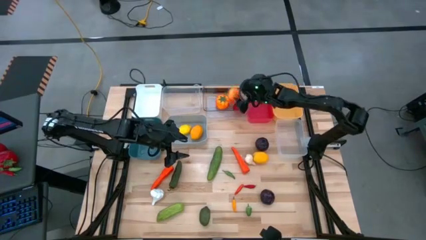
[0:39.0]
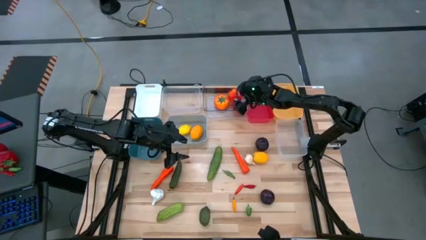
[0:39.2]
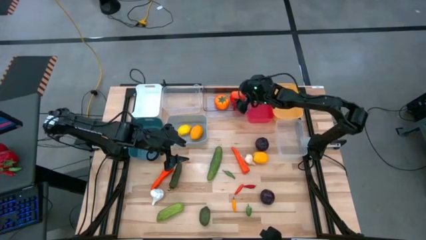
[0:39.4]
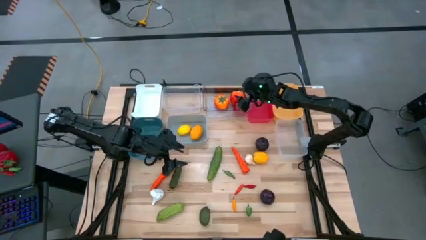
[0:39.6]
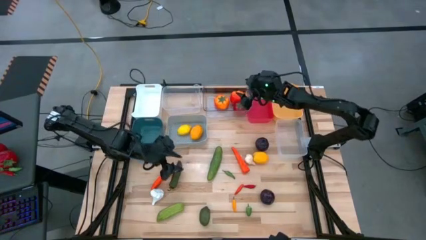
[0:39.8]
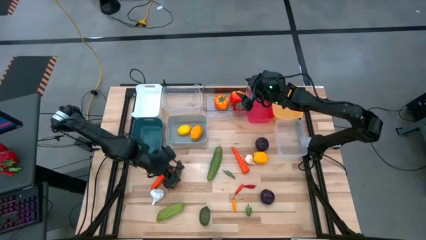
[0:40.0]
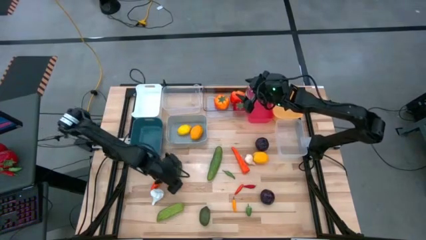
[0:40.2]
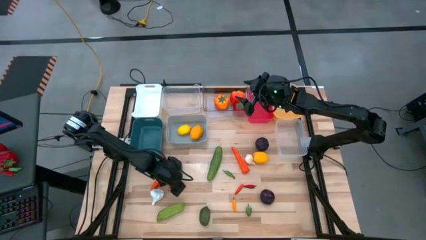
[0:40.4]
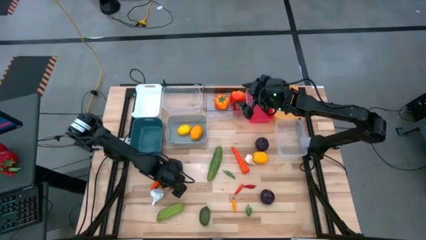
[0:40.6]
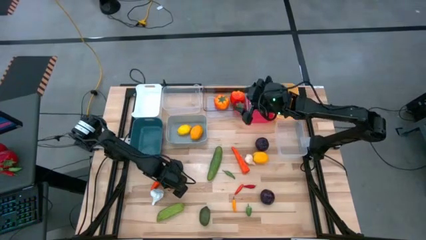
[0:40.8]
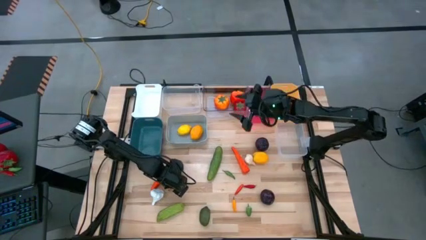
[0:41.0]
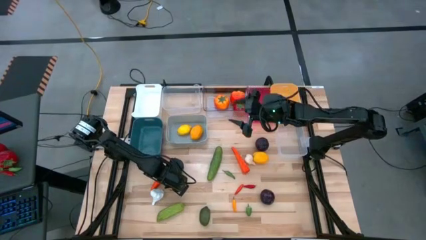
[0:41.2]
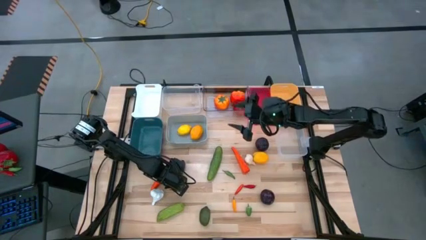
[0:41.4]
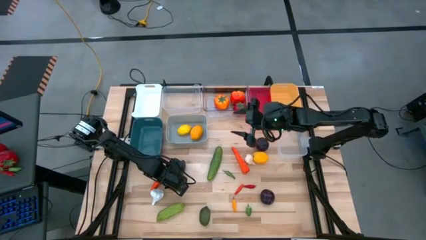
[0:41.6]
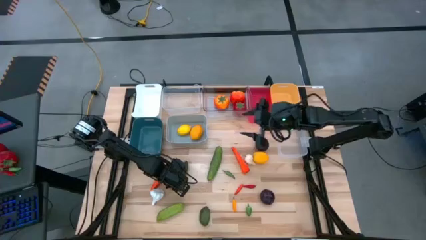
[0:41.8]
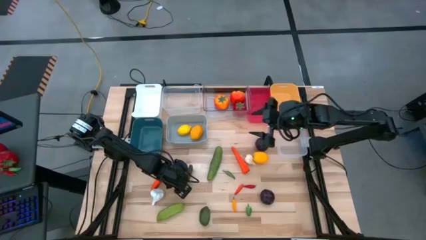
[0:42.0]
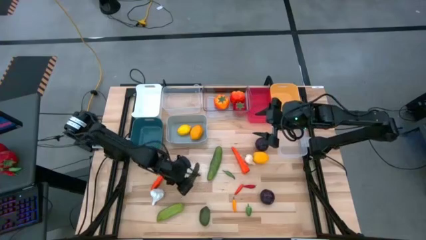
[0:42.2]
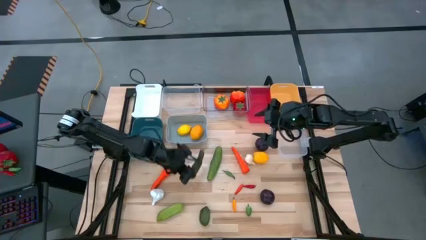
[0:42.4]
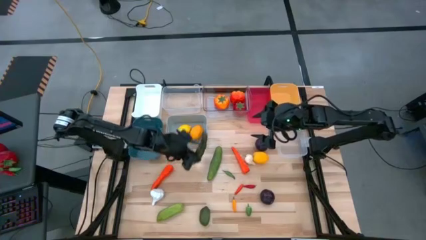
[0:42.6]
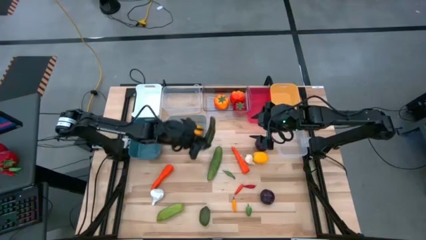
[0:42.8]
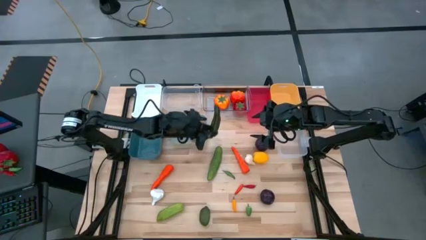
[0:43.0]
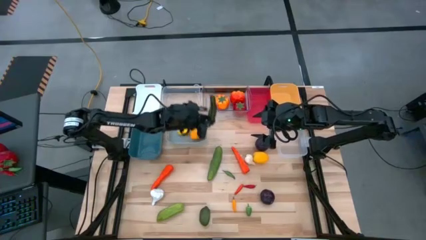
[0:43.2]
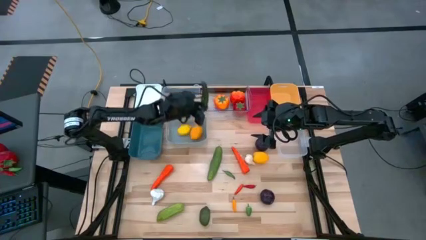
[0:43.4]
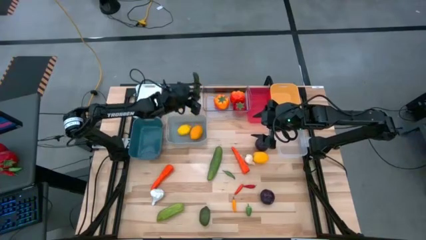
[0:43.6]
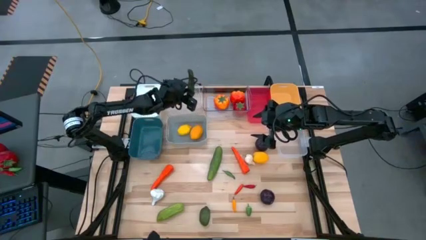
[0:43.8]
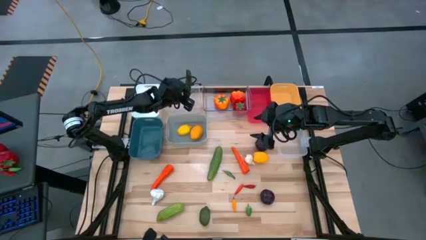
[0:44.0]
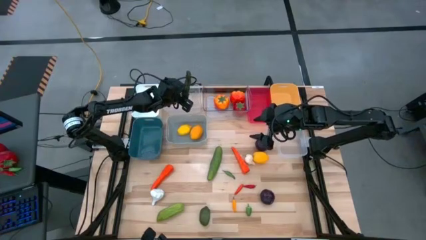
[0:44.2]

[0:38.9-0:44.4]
Task: Sort produce into baskets
Put the green chili pepper into the top left transparent bin

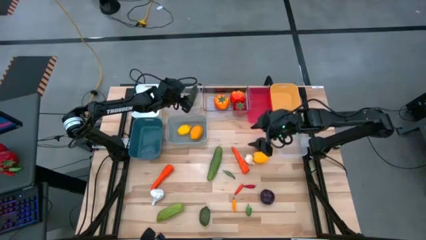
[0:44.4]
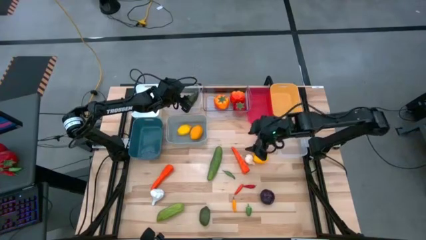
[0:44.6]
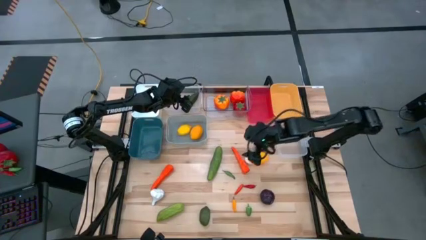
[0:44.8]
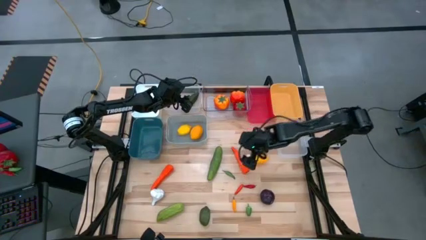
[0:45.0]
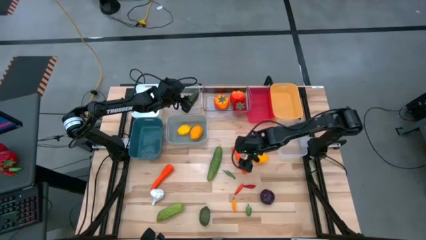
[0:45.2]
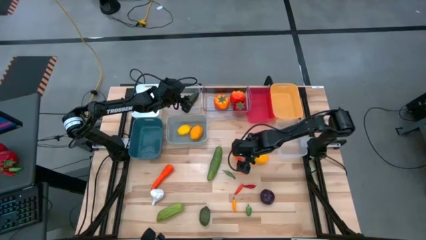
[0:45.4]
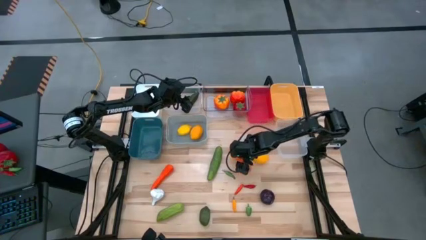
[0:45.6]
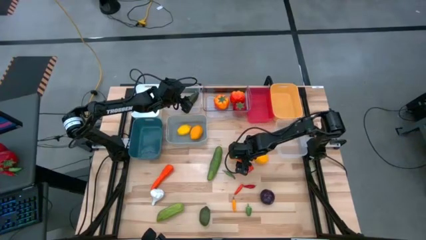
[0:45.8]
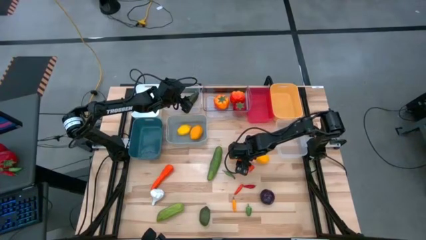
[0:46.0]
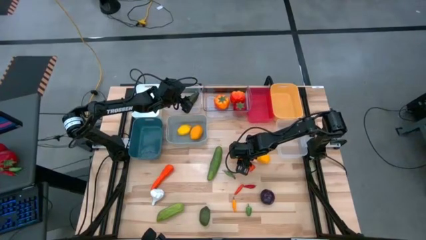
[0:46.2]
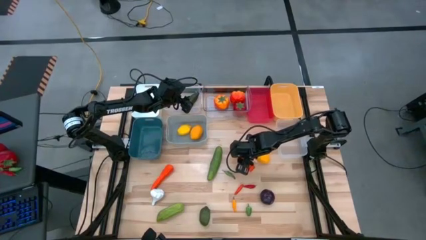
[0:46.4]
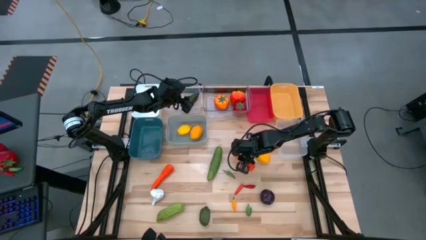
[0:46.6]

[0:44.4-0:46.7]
Put the right carrot into the red bin

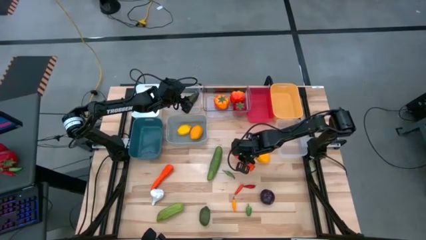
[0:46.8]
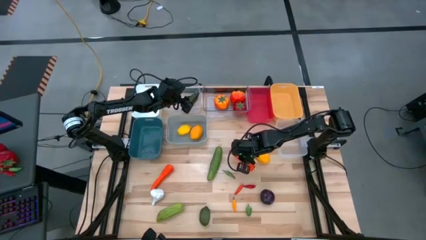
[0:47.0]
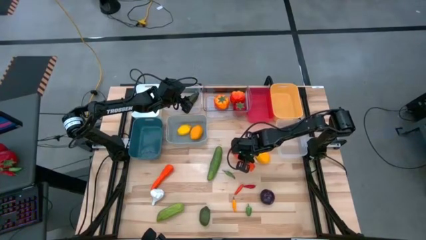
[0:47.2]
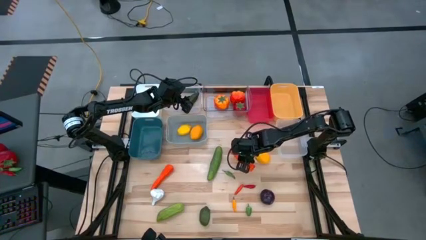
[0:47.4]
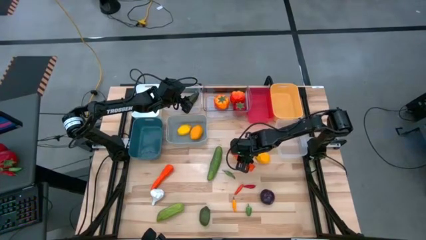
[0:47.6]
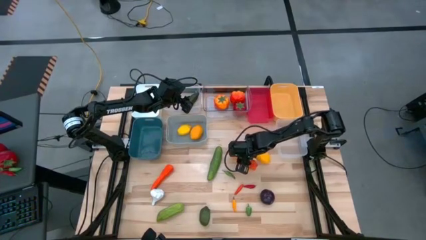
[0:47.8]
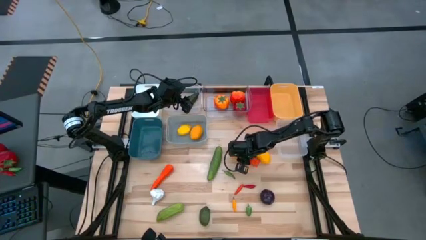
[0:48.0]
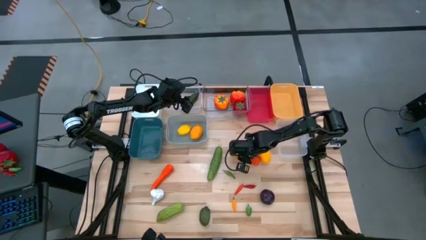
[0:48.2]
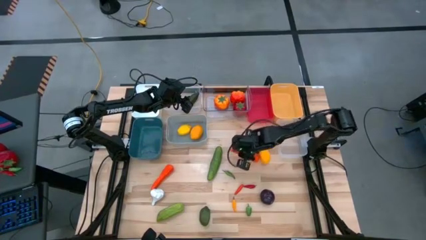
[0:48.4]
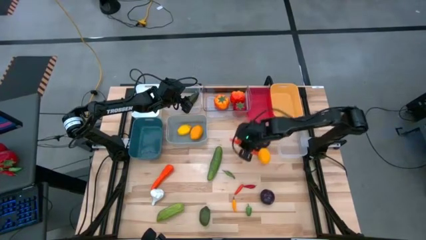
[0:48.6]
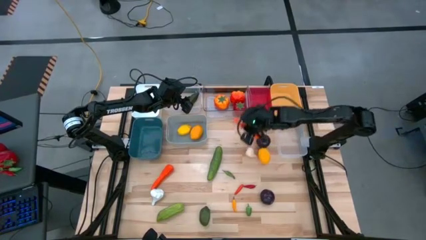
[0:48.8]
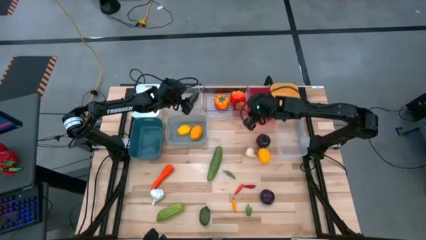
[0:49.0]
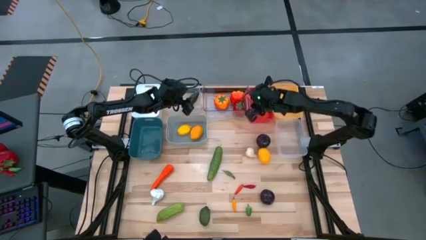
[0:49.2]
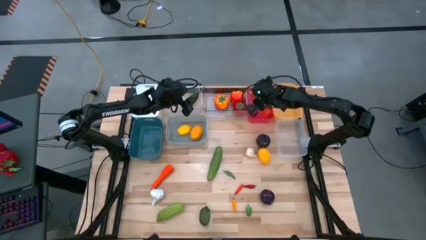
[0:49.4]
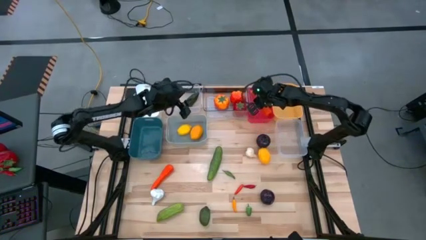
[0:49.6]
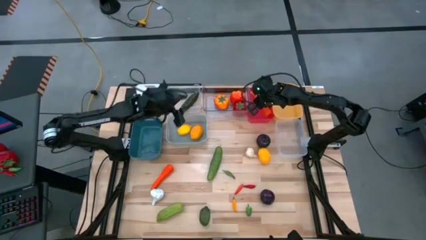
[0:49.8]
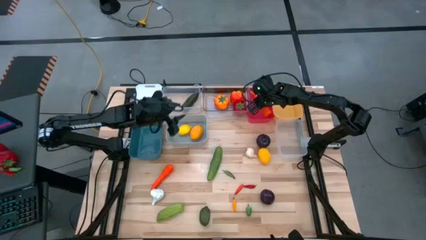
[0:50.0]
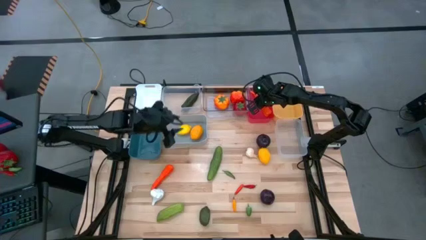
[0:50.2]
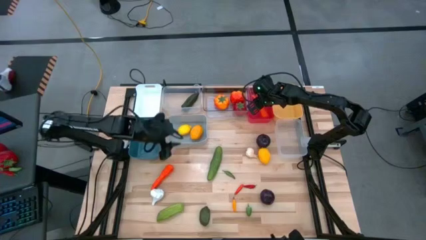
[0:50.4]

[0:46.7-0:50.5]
Put the right orange carrot into the red bin

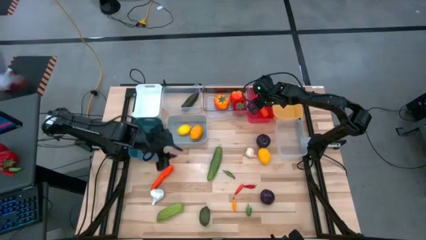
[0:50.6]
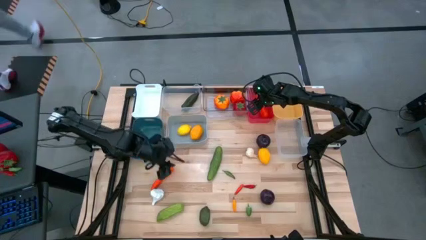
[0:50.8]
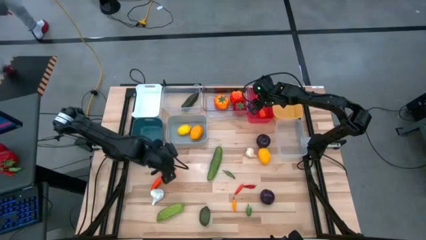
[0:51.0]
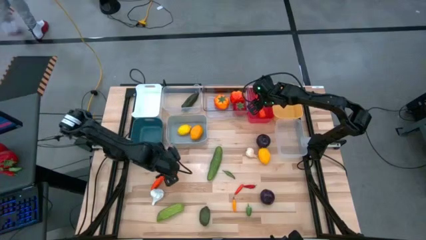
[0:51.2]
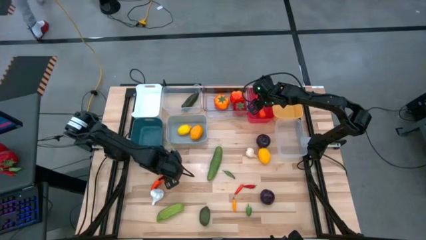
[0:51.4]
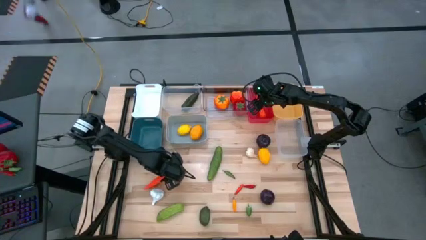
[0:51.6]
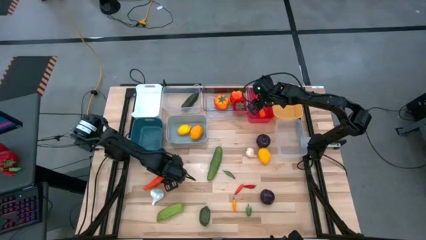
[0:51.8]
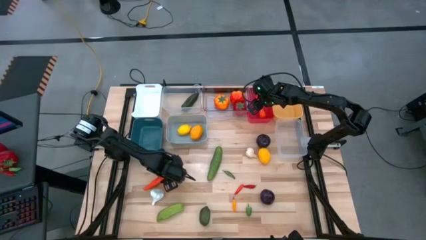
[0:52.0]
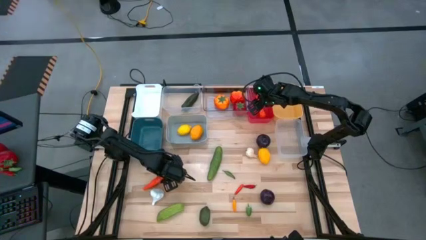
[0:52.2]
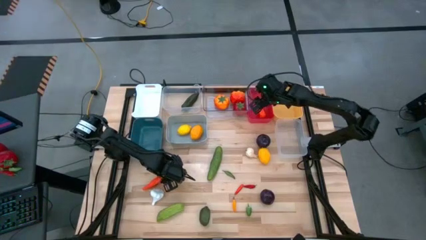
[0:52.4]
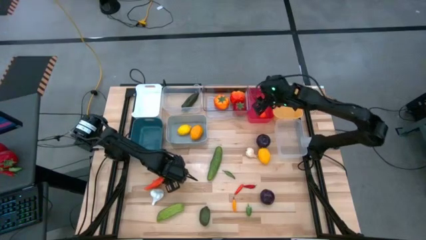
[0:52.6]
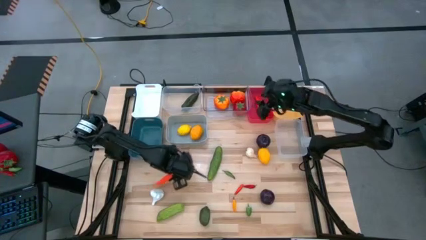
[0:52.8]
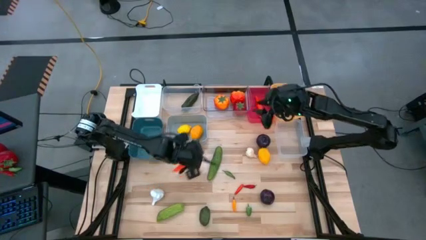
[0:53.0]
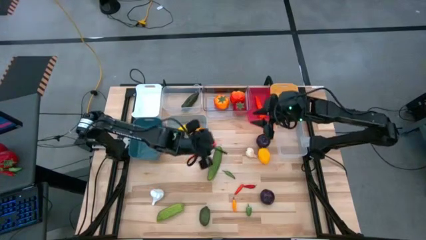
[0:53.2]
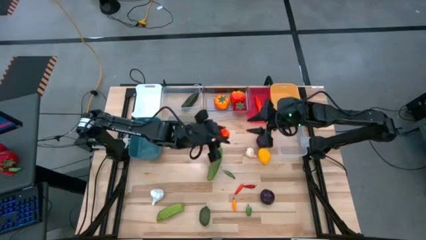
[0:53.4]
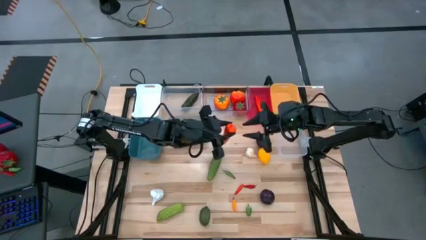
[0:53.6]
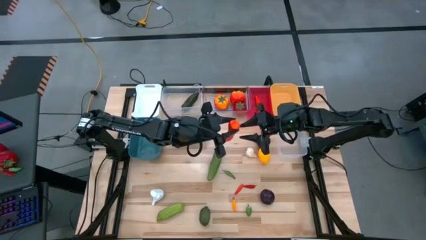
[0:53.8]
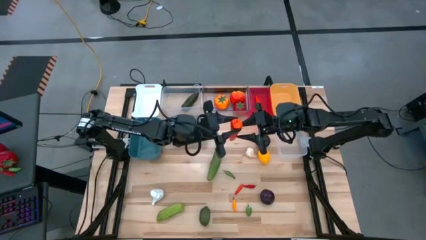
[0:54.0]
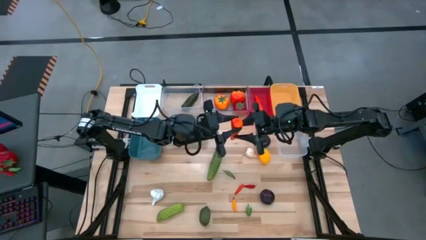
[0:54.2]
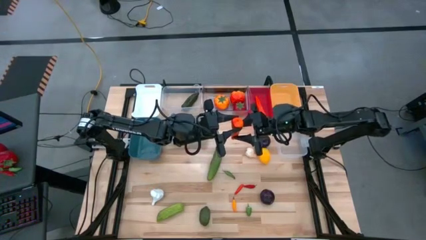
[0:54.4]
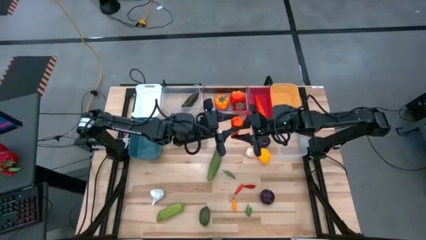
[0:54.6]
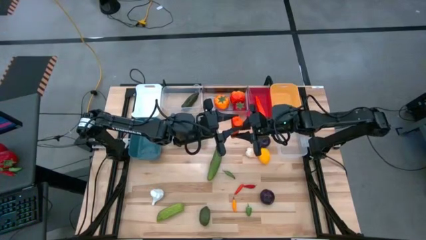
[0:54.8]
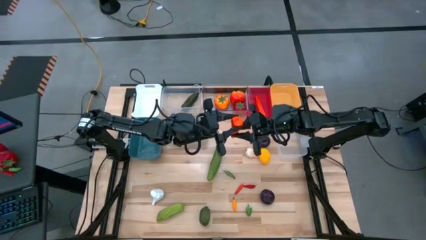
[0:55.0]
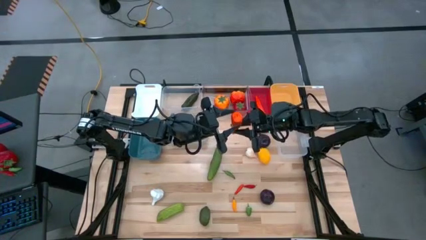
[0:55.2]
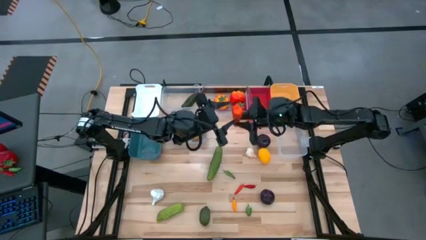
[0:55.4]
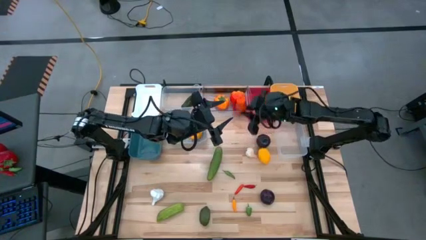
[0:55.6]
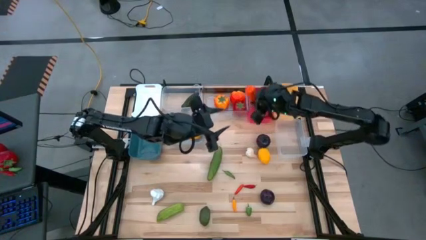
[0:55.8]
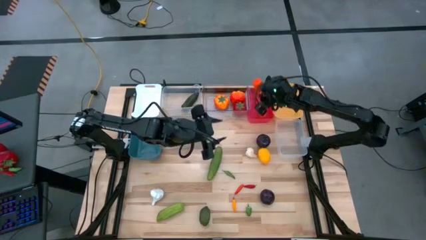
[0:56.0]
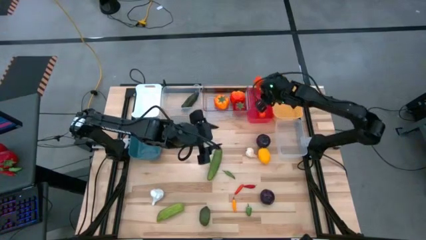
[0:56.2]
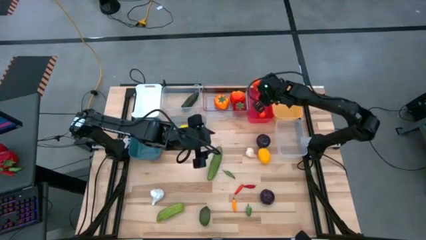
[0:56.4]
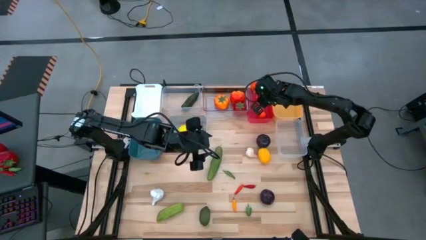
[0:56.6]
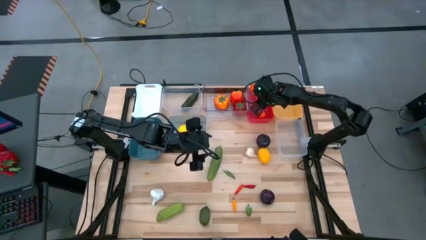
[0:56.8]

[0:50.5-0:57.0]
Put the orange carrot into the red bin
